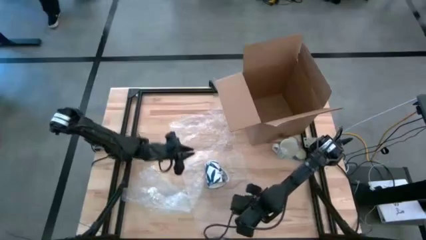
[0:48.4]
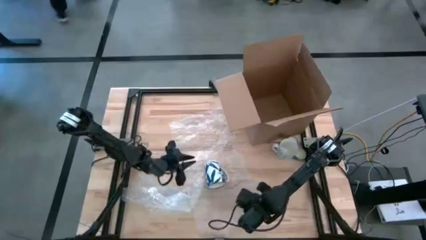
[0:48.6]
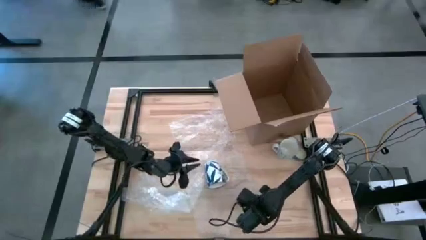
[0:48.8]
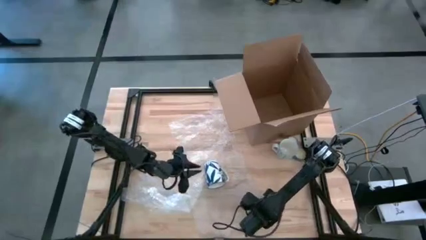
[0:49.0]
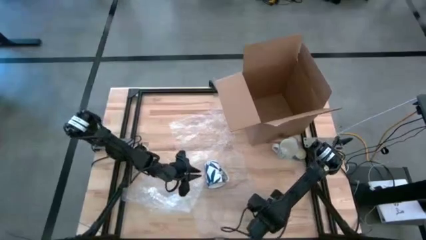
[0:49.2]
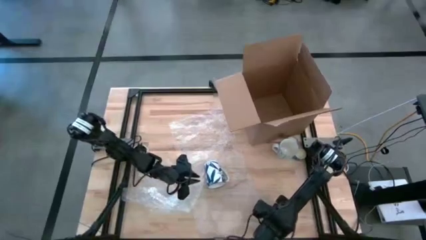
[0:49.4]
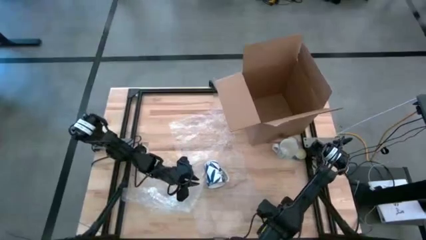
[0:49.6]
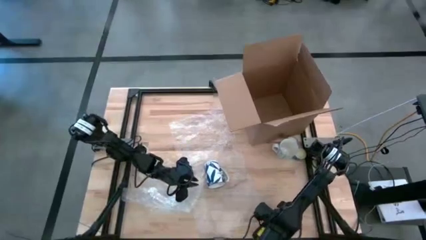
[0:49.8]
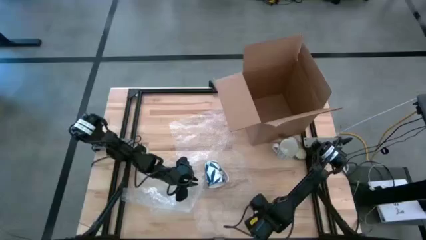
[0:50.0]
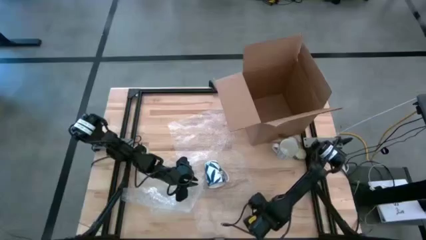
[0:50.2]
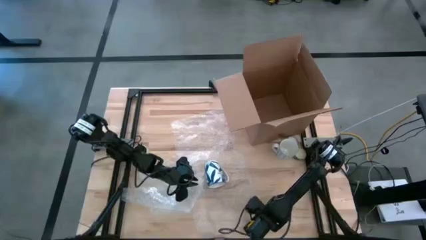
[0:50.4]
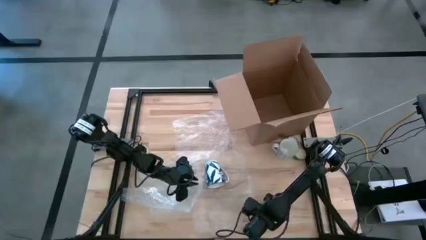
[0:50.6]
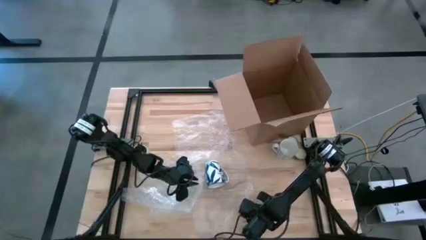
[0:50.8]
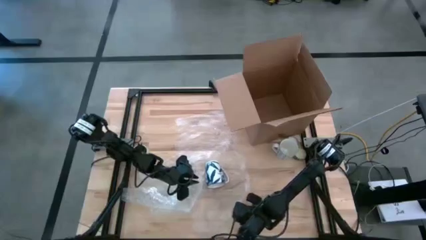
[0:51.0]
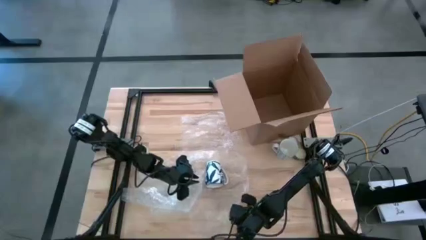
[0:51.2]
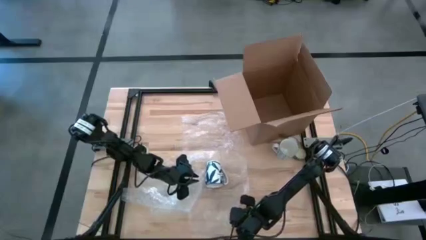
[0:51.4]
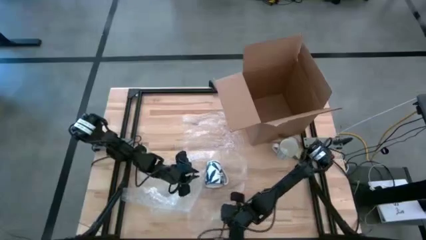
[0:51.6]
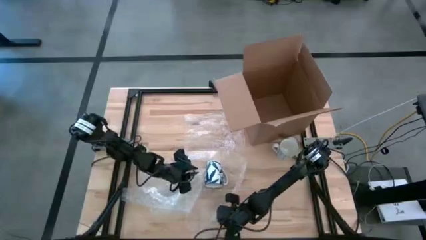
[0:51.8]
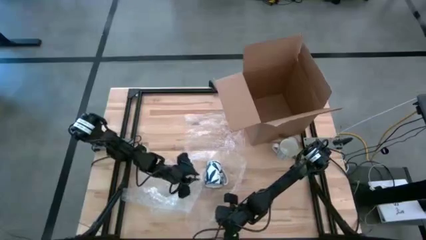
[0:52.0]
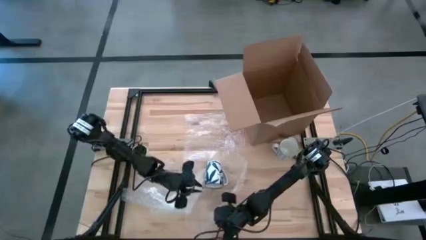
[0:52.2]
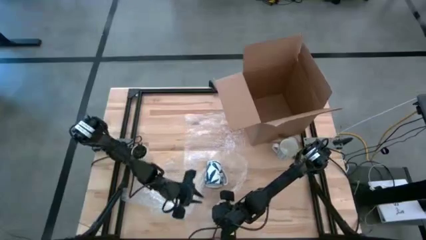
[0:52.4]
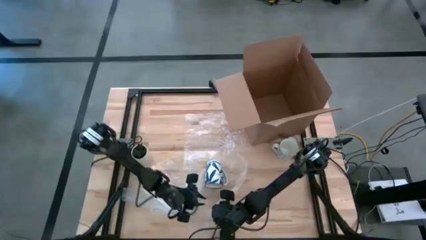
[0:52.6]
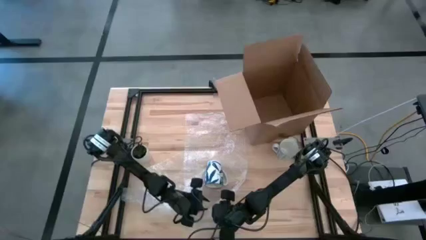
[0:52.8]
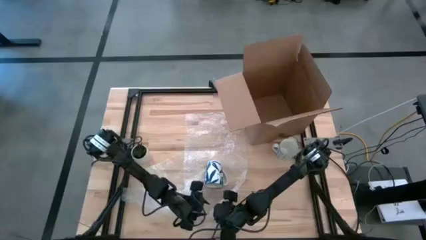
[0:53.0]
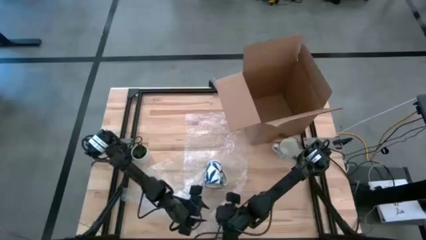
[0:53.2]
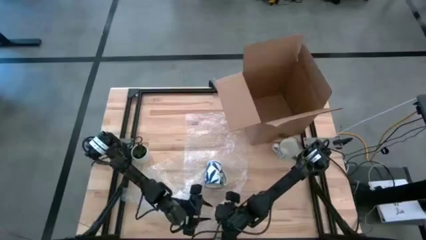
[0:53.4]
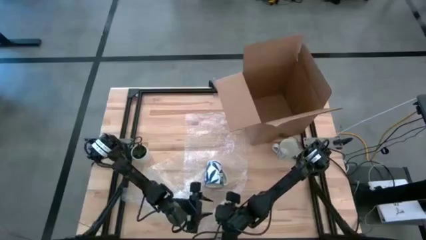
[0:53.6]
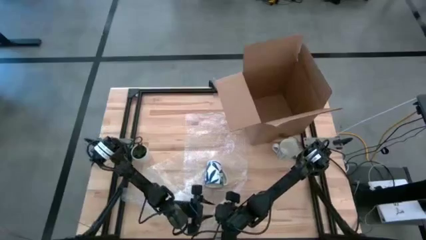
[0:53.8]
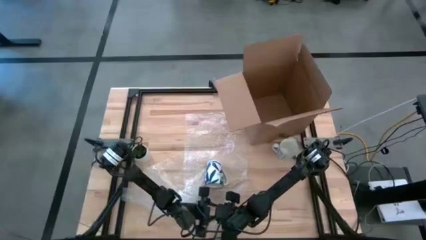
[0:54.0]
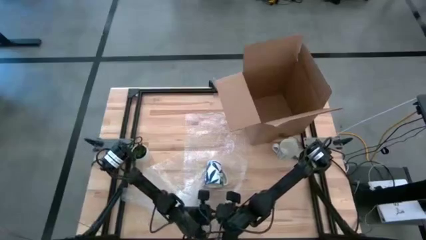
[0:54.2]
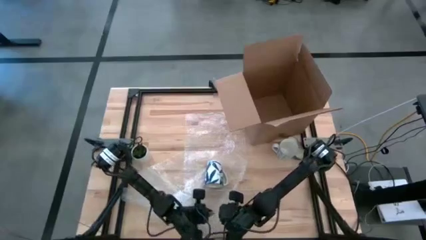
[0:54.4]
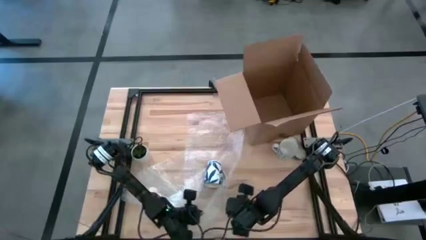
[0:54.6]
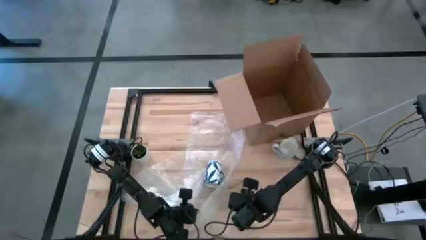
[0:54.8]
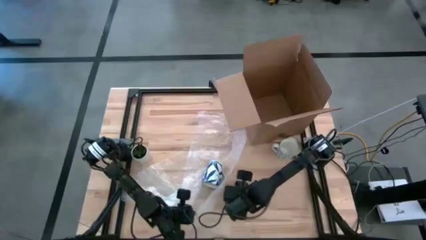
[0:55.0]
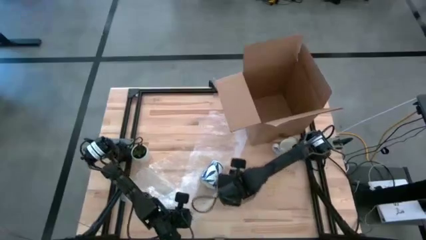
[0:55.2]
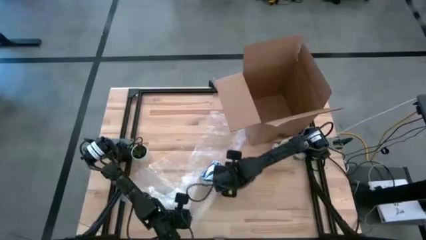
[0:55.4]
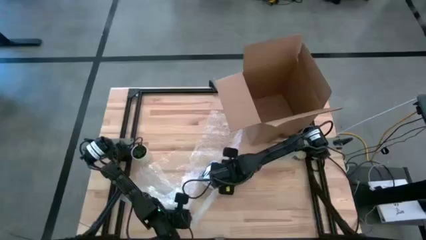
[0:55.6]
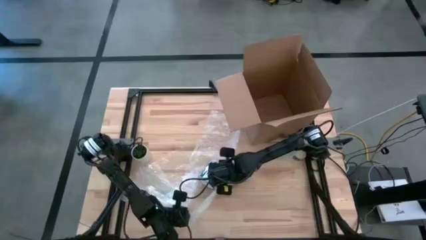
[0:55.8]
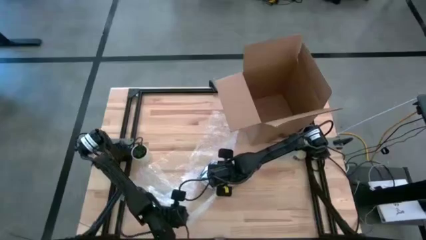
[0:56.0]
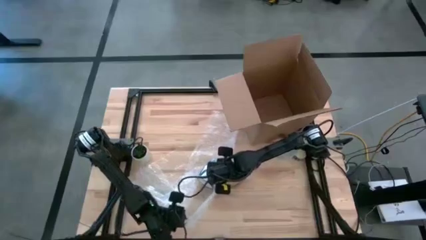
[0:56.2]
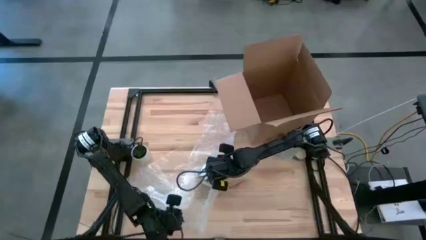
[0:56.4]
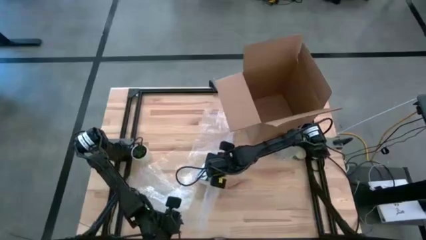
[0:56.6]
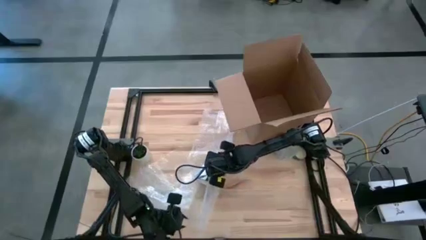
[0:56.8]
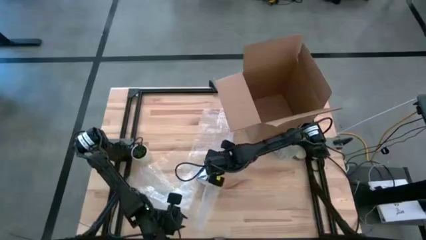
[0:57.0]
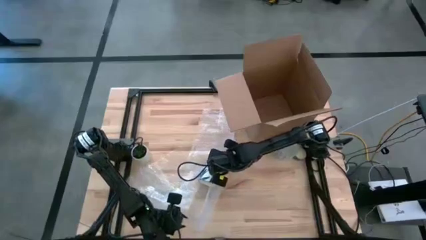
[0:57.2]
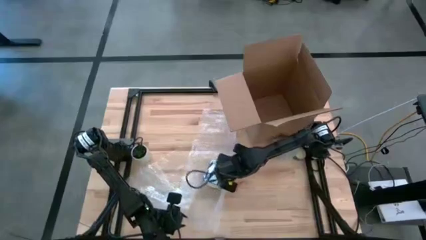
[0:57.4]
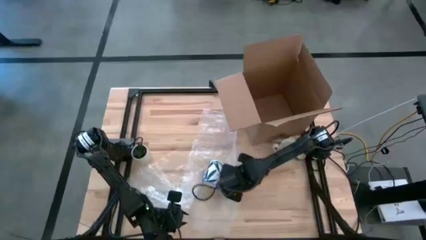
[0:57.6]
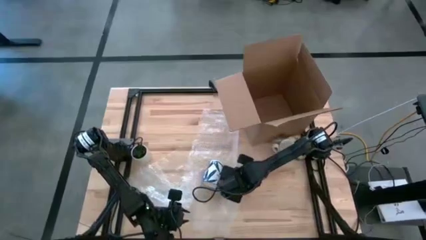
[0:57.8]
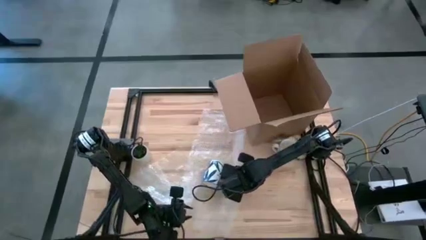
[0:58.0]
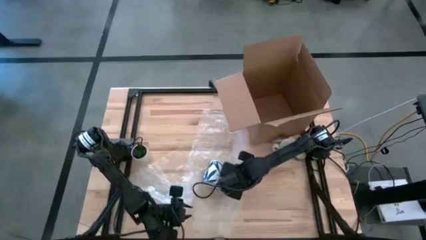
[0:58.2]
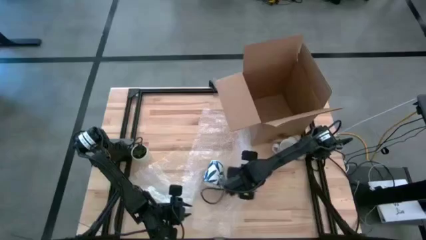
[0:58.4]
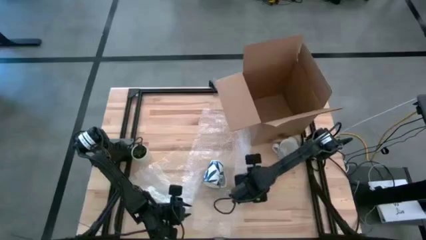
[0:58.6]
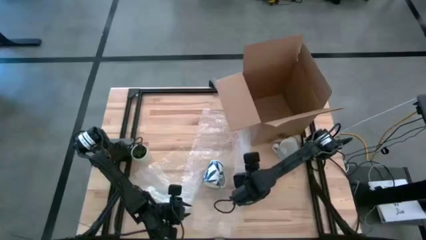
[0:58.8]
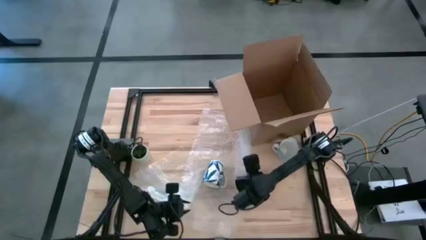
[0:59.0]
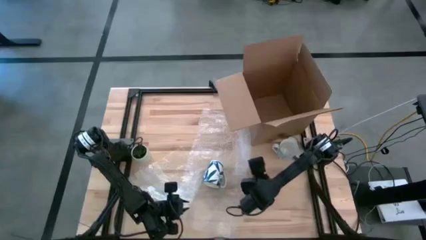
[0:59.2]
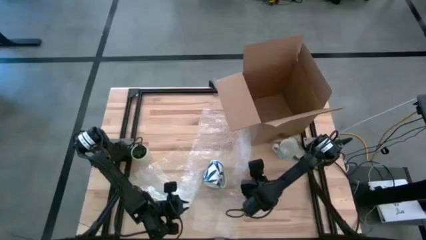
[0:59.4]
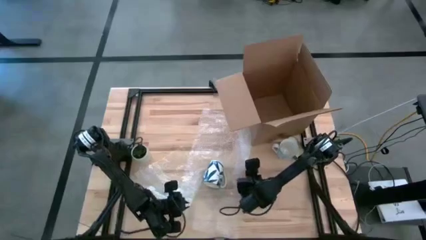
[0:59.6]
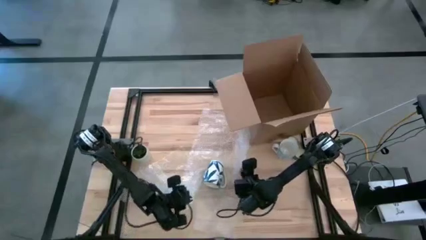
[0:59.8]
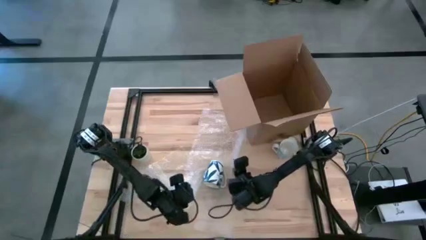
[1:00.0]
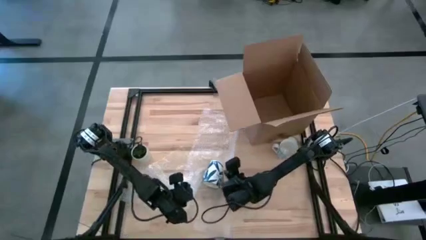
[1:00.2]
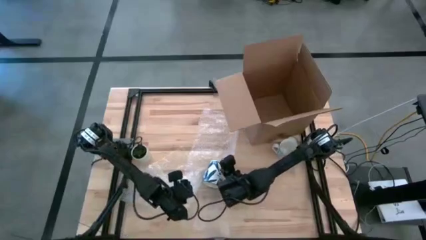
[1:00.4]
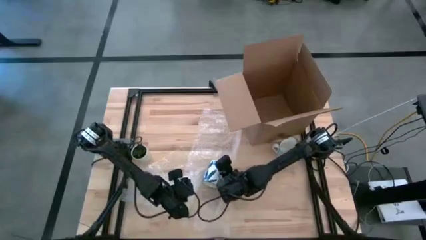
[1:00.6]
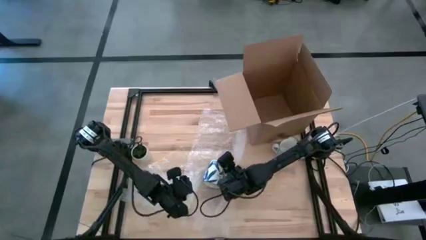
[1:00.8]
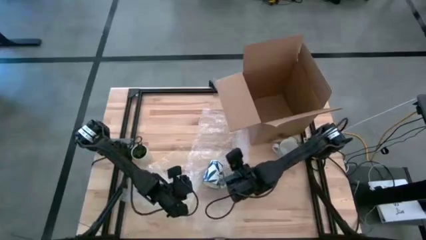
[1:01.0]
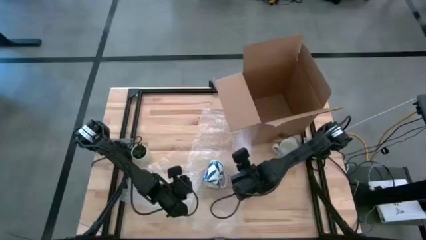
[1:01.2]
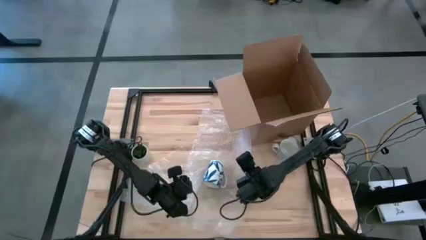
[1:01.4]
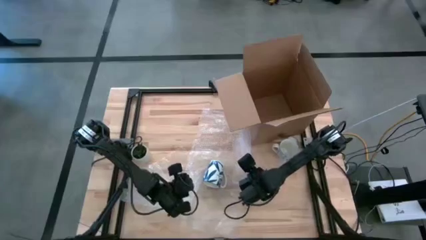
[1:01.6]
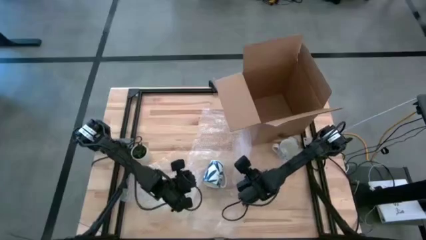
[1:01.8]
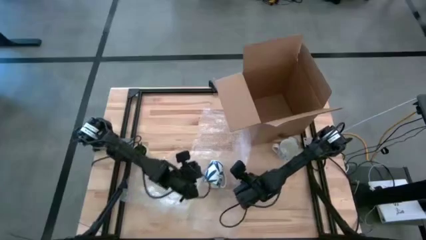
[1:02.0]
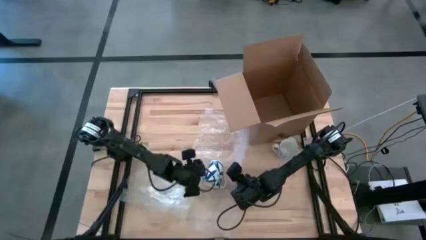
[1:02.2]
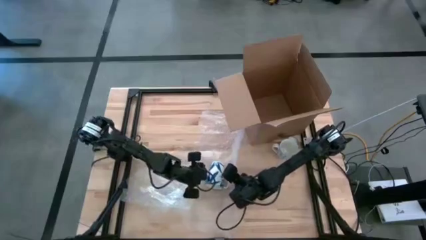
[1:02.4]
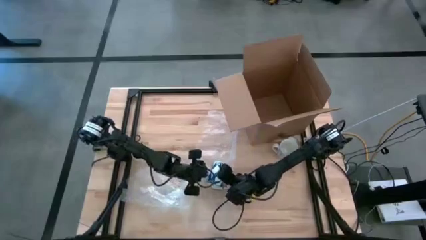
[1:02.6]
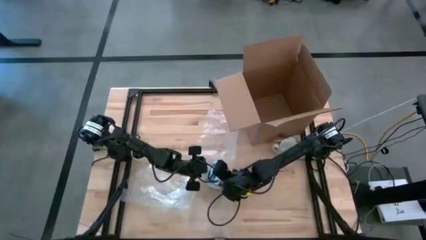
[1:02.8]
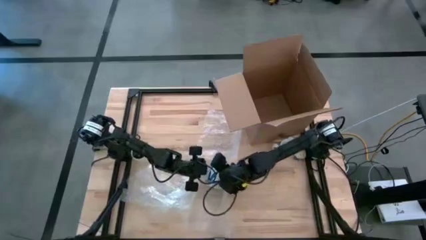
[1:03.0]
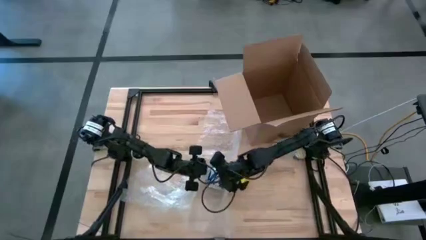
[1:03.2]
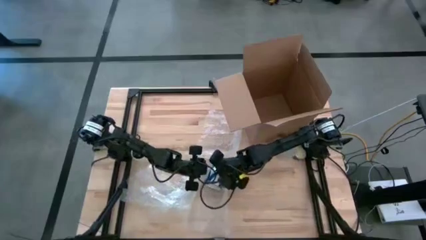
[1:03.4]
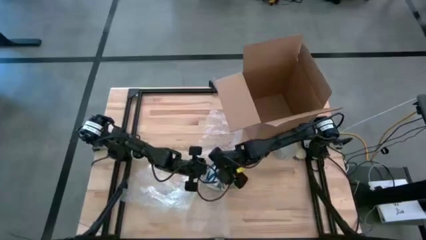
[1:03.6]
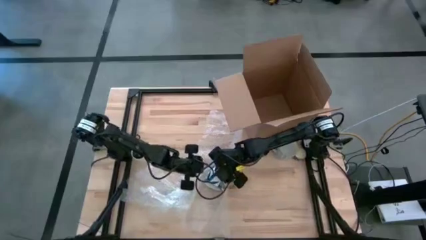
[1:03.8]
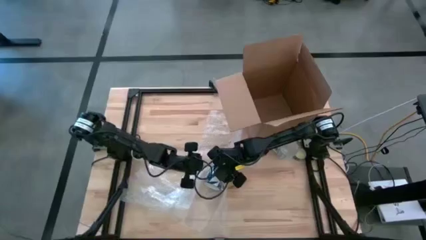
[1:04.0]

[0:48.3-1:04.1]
Task: wrap mug
Wrap the blue mug with the right bubble wrap
